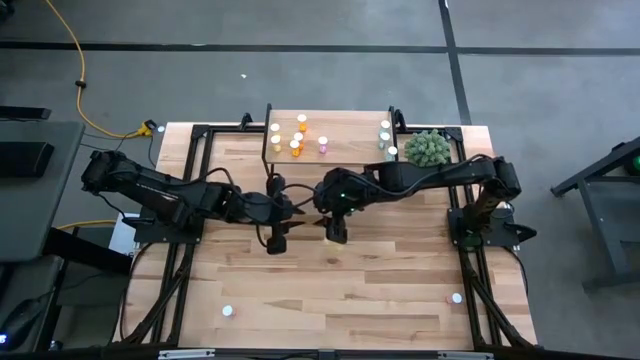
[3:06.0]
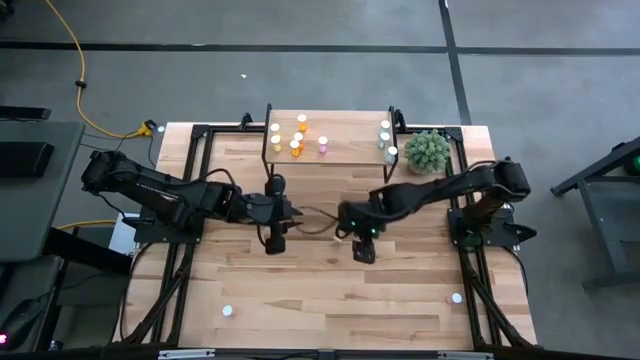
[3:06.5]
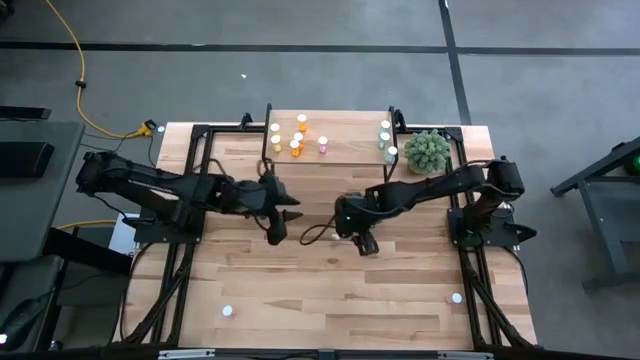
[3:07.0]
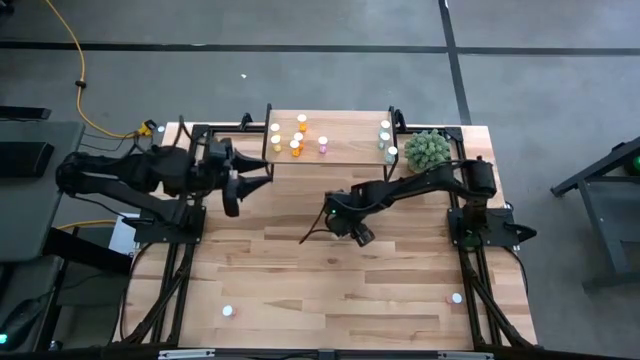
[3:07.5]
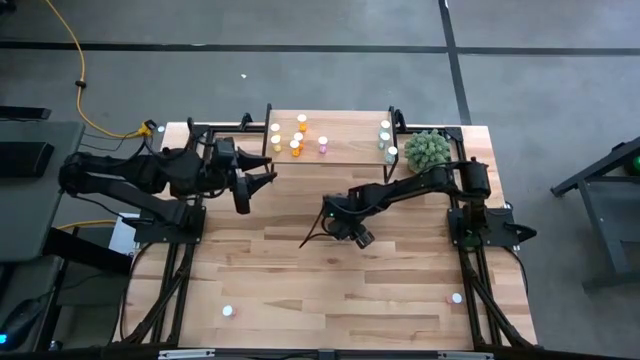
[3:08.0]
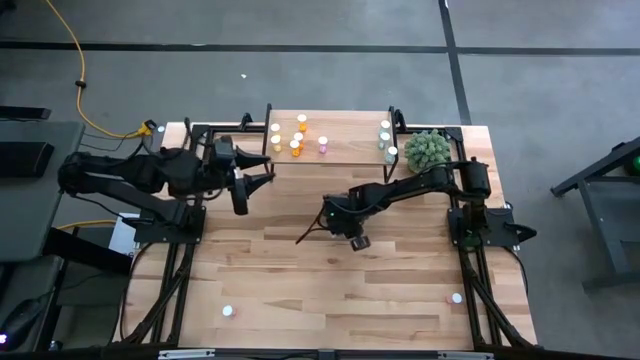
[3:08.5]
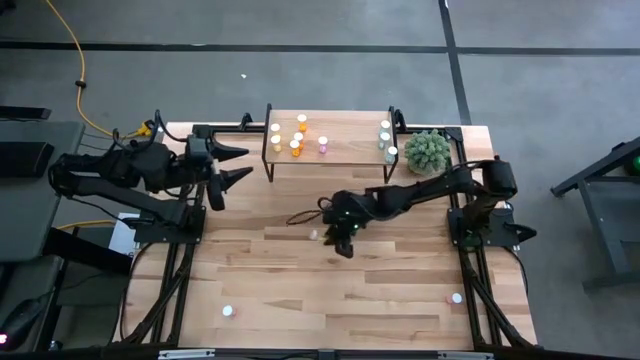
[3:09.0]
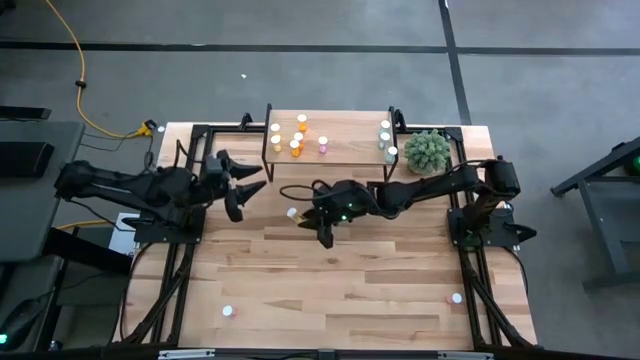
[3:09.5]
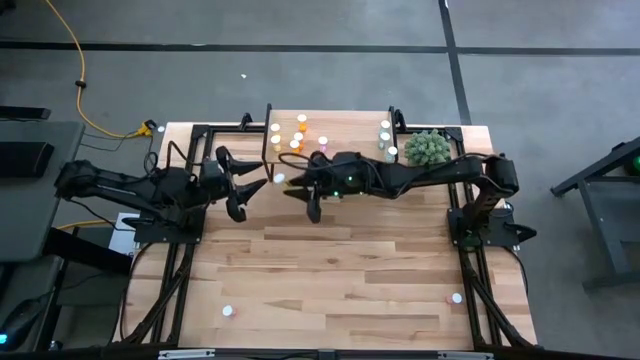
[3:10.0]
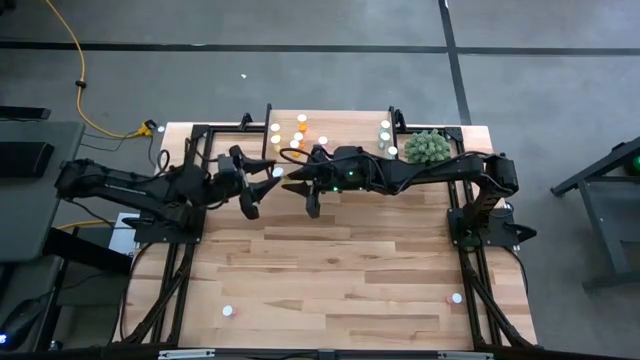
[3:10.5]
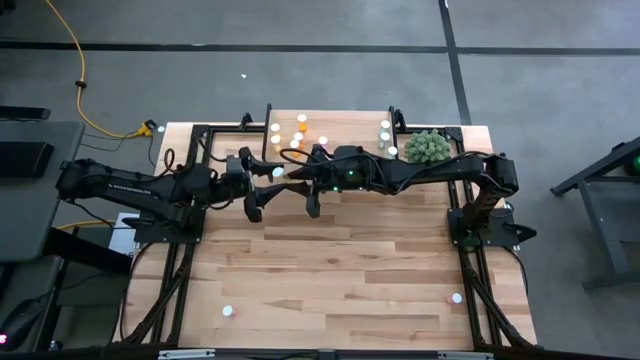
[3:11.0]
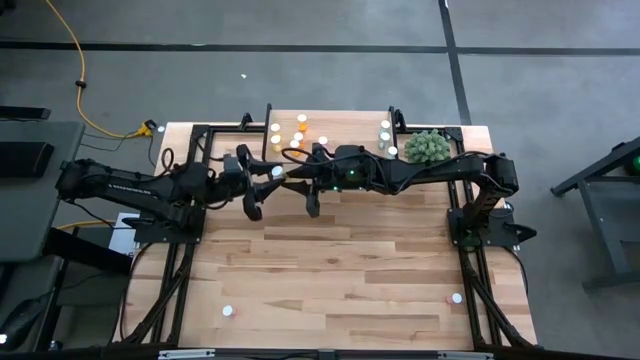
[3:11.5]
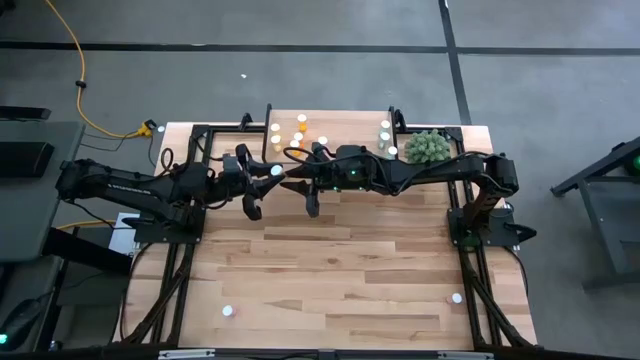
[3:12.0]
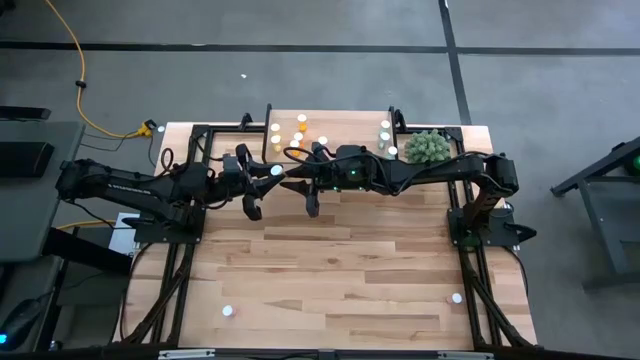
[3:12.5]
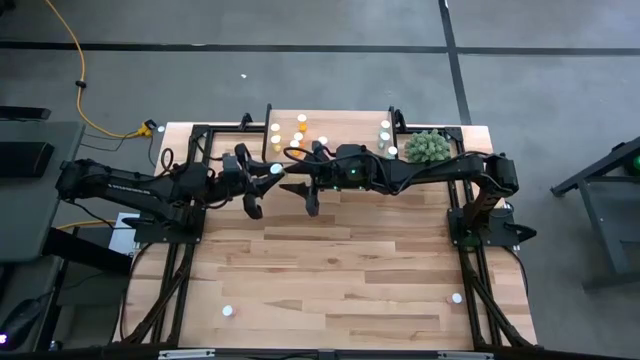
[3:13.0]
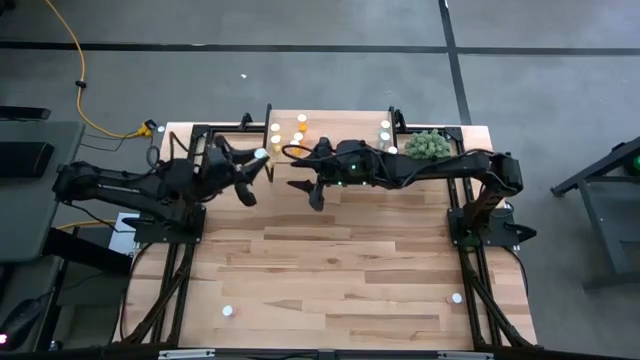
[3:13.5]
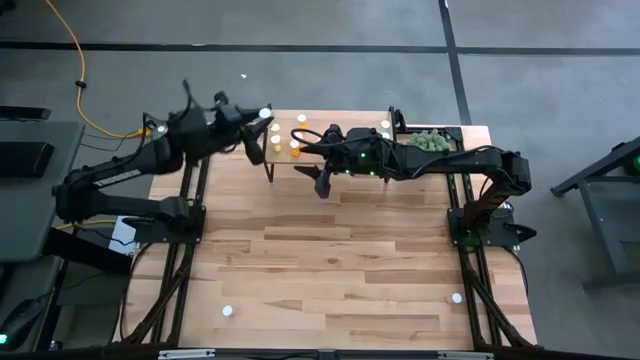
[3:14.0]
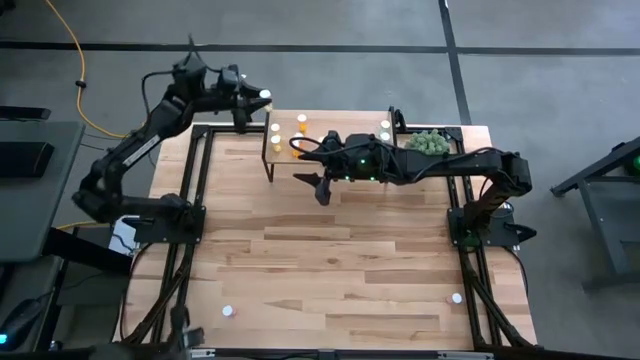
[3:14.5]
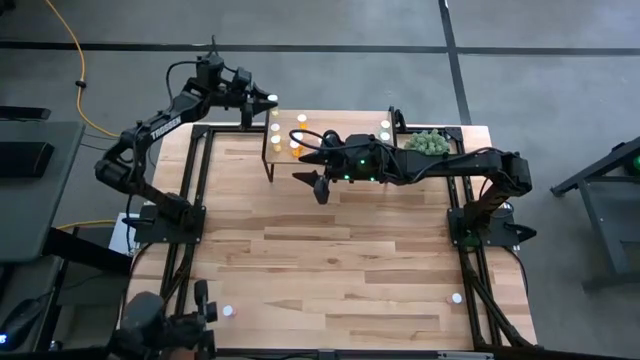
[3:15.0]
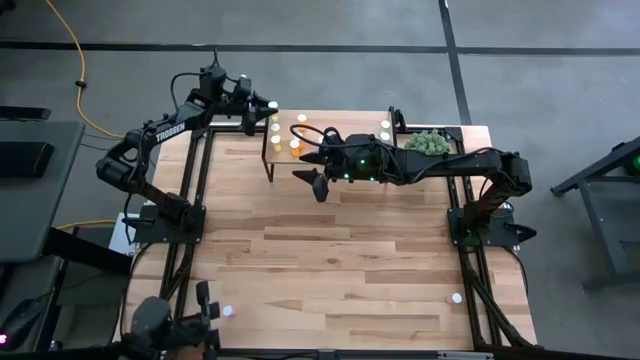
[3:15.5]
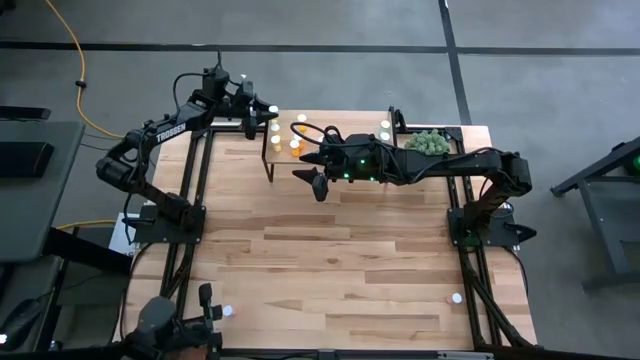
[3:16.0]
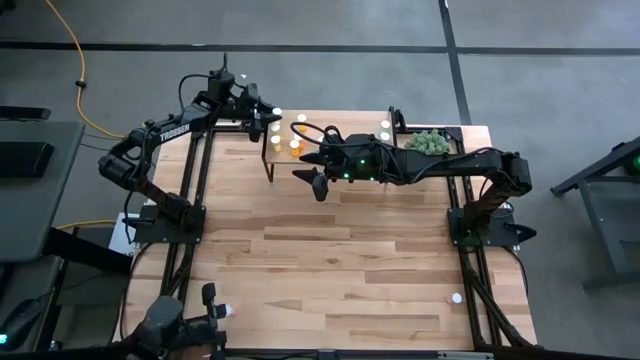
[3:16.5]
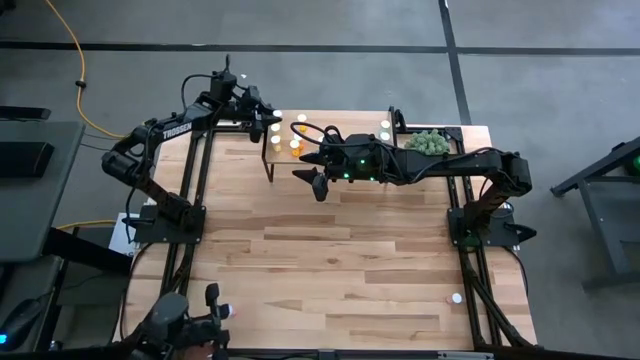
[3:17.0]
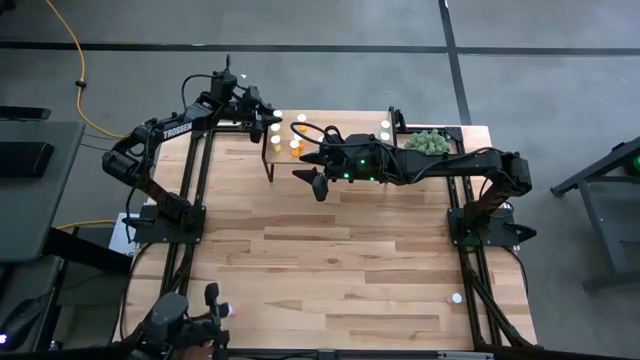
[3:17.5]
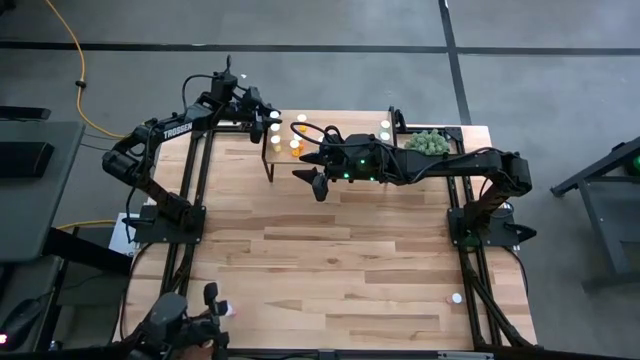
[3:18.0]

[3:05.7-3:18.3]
Task: Pick and place medicine bottles onto shelf by color
Put the yellow pill bottle aligned with the other yellow pill bottles on the shelf

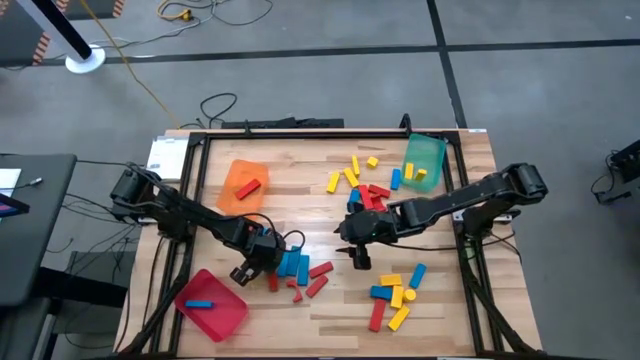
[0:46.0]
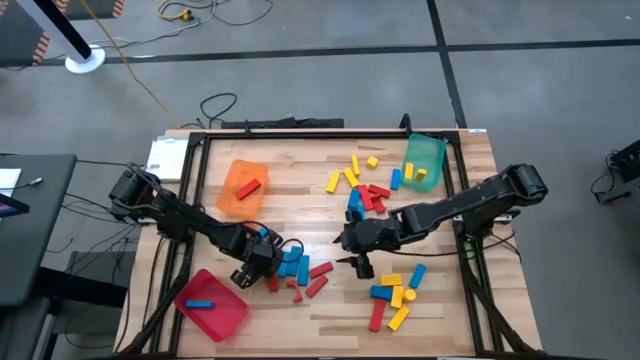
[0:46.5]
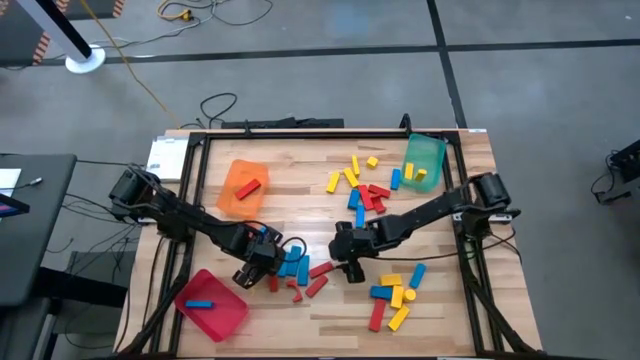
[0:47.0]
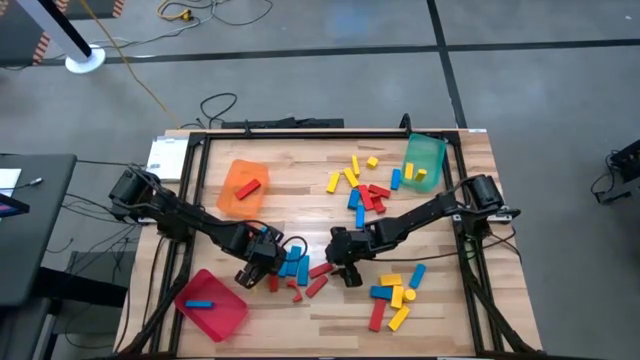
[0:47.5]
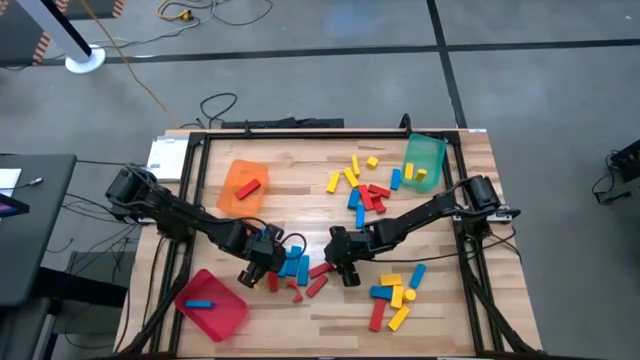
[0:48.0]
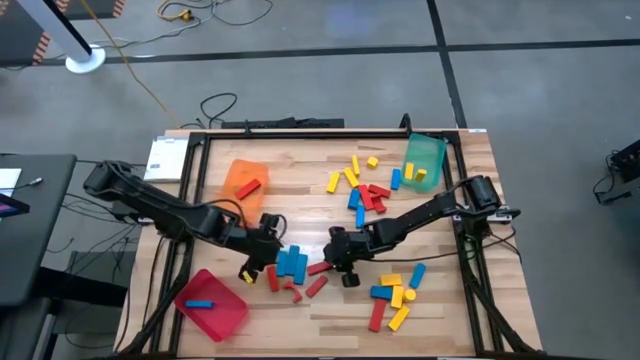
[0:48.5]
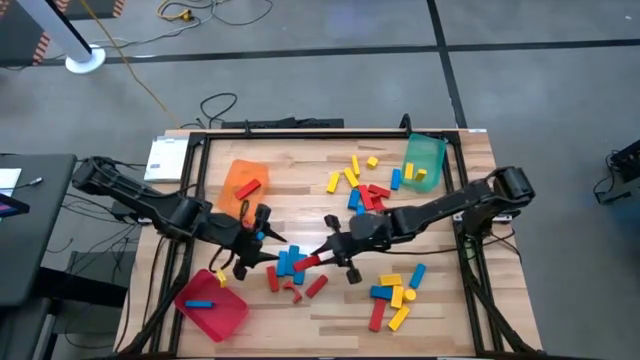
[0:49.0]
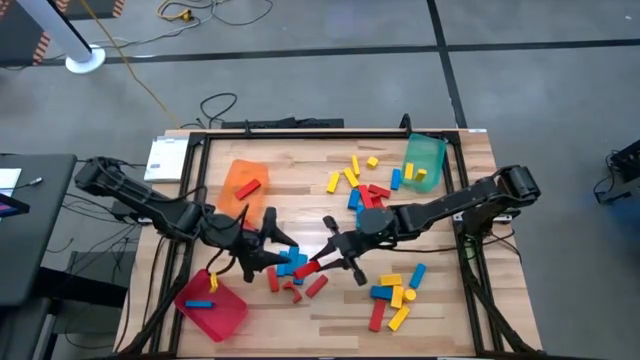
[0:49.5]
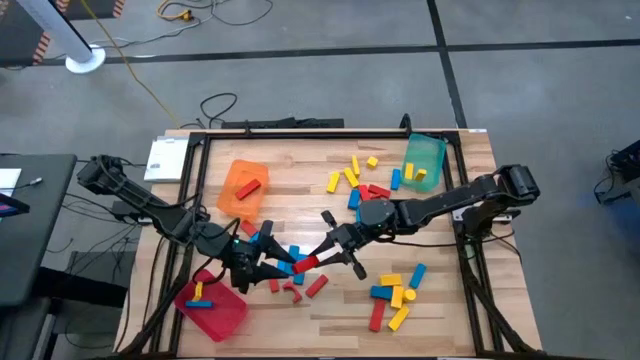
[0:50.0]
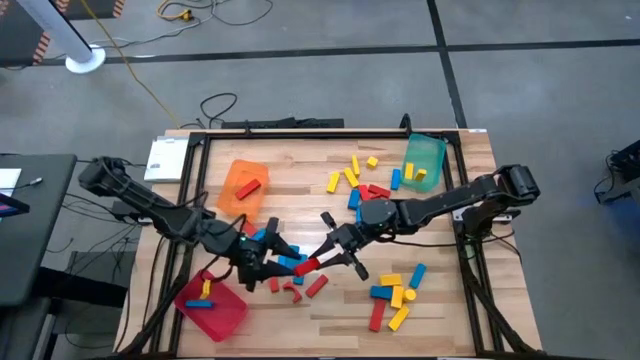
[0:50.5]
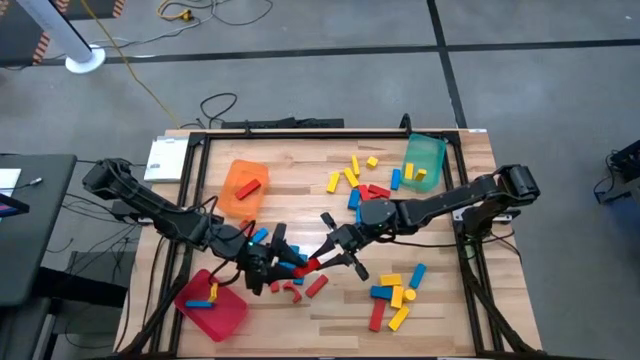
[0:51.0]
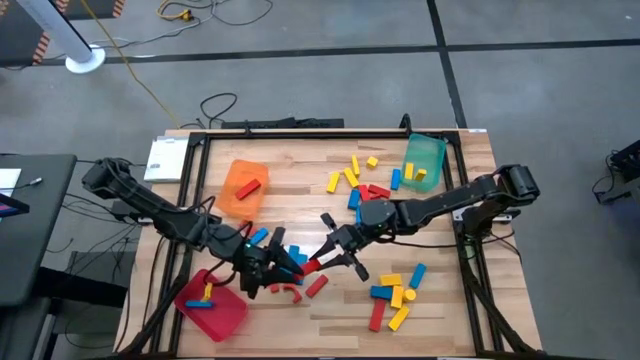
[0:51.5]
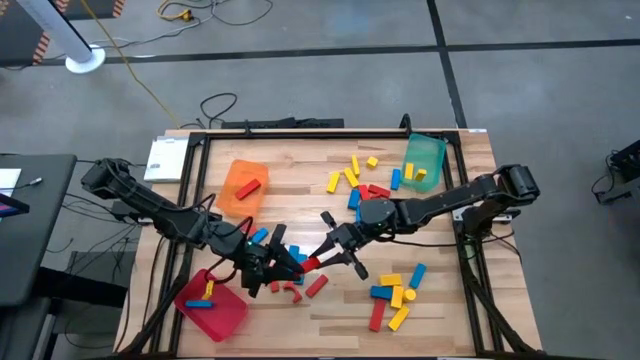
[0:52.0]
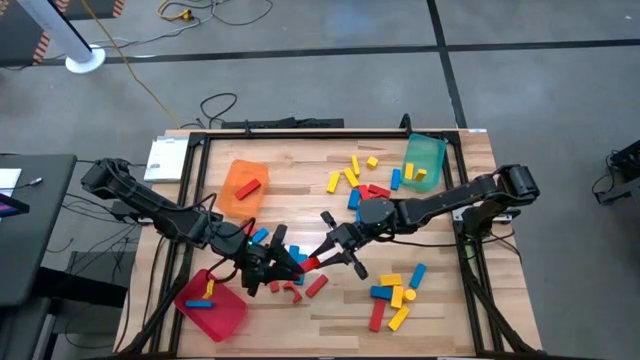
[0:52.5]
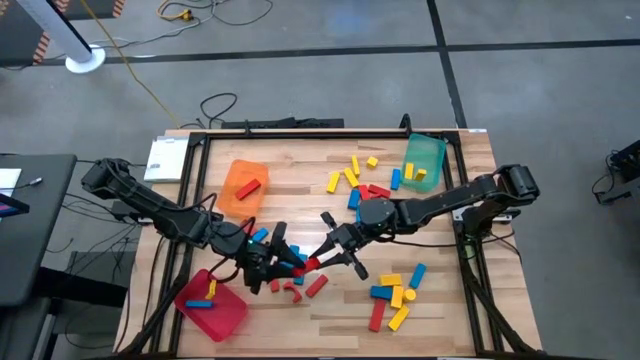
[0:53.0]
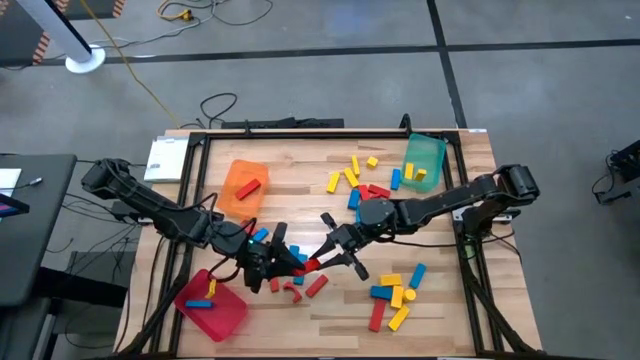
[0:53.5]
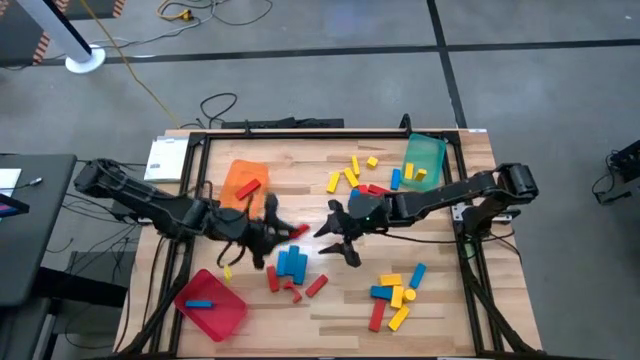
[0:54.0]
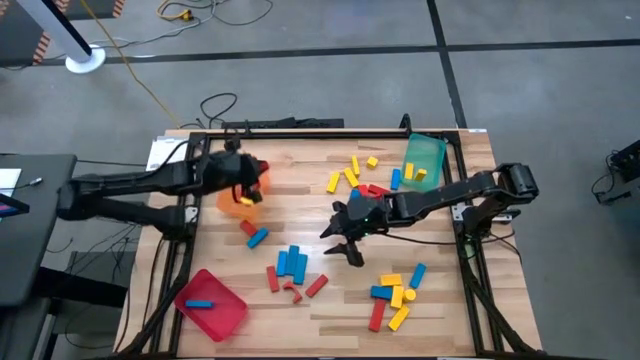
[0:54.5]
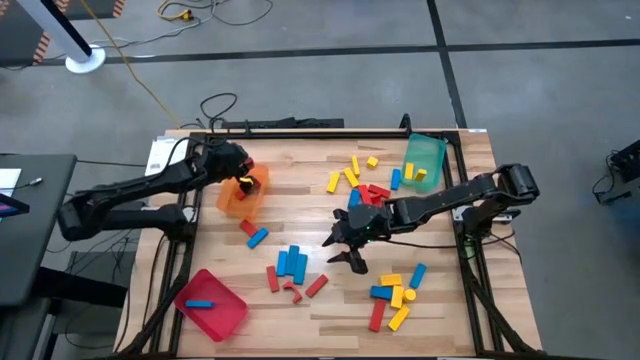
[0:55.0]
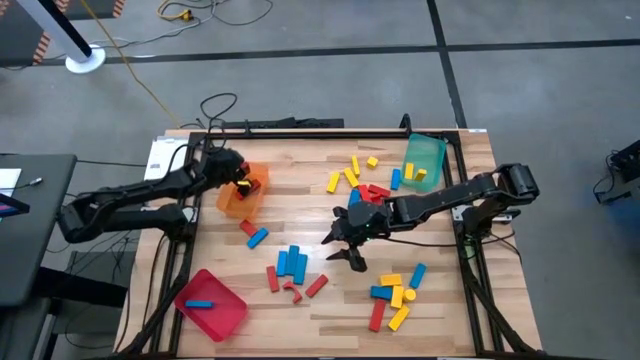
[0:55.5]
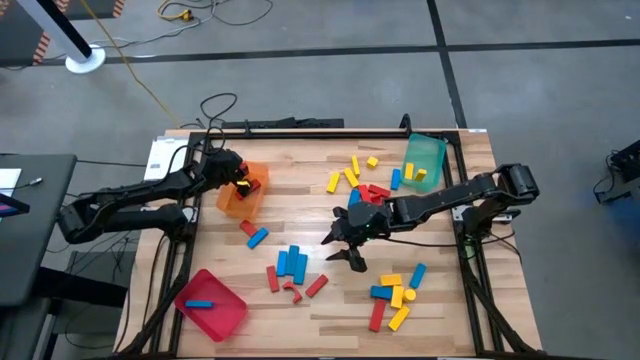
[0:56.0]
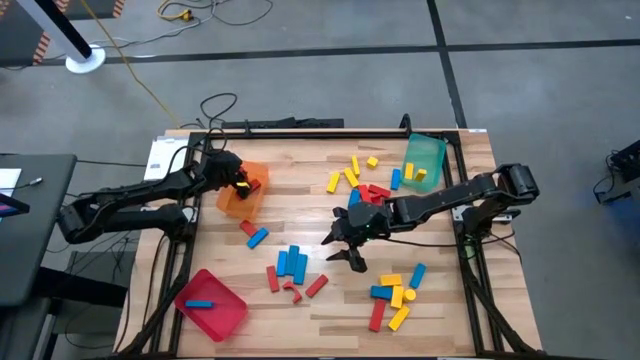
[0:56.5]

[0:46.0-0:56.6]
Task: Sort blocks
Put the red wooden block into the orange bin
